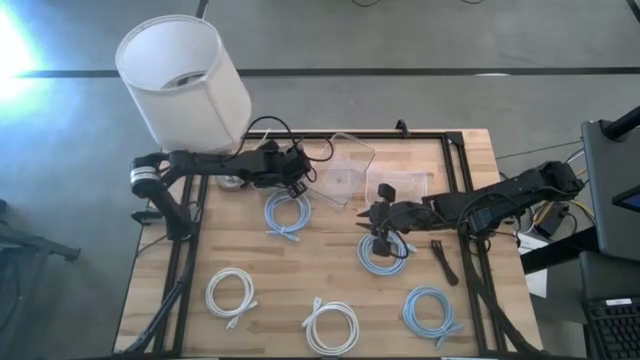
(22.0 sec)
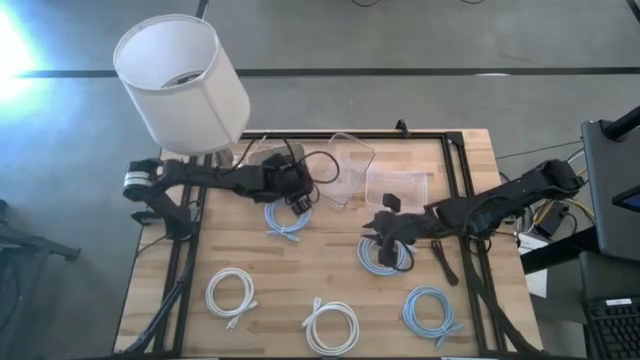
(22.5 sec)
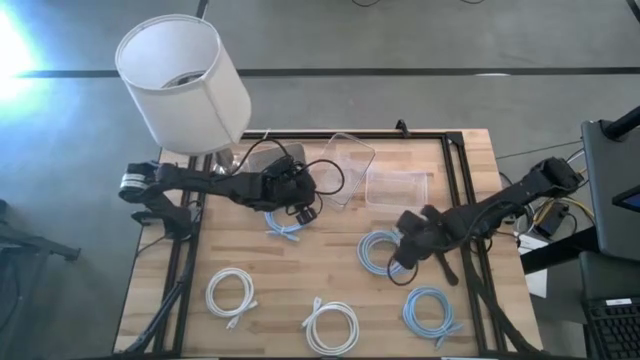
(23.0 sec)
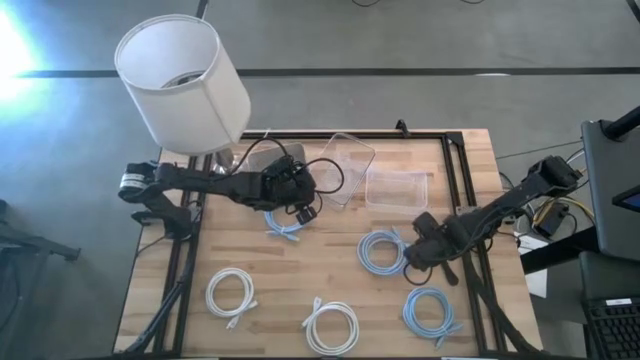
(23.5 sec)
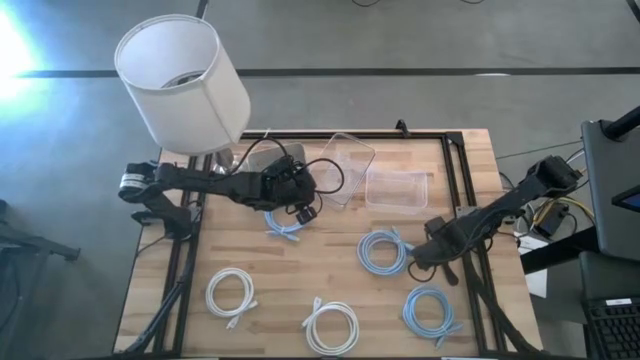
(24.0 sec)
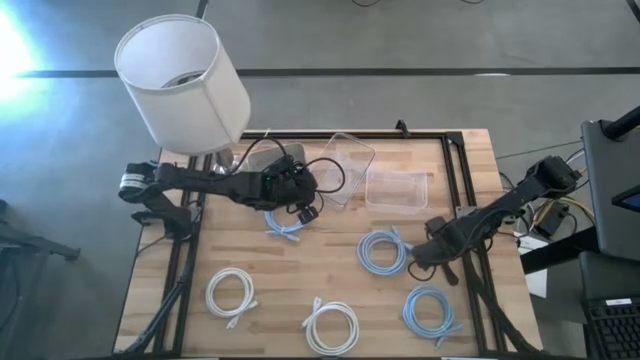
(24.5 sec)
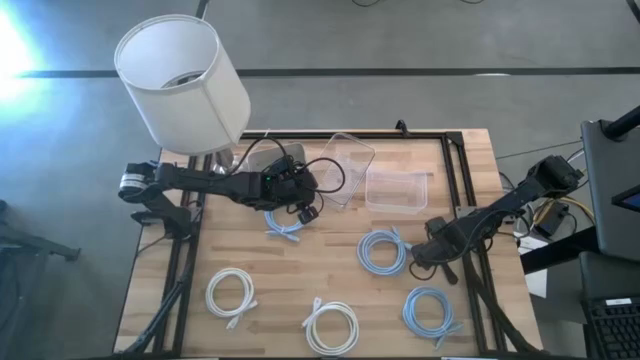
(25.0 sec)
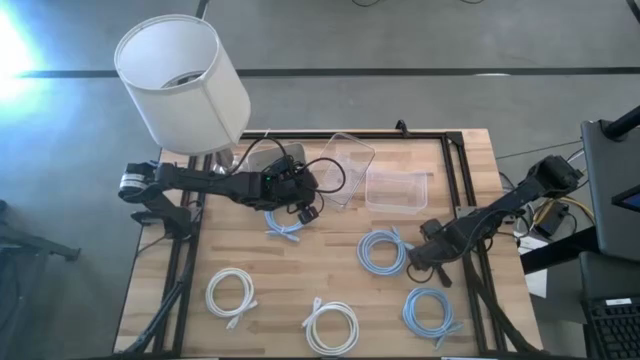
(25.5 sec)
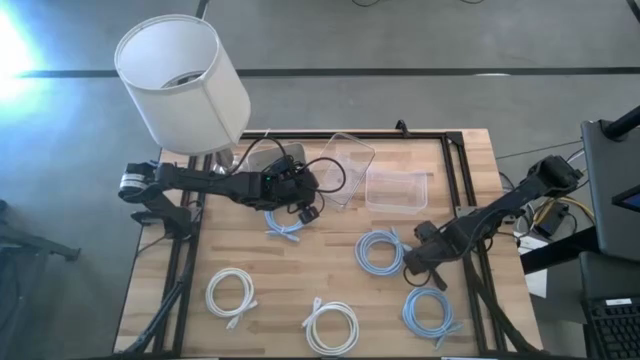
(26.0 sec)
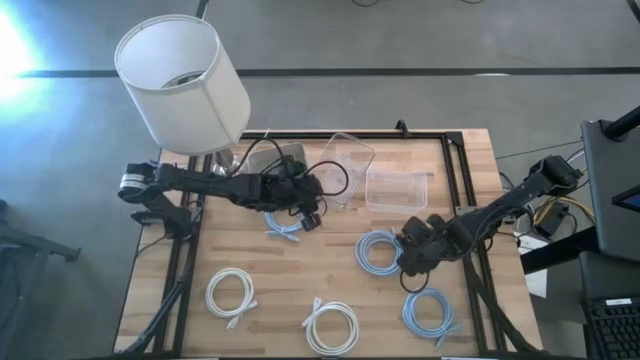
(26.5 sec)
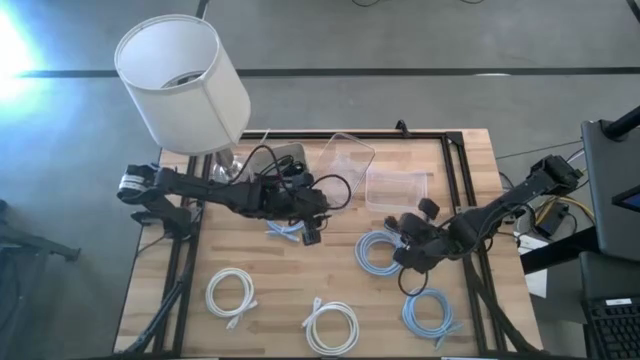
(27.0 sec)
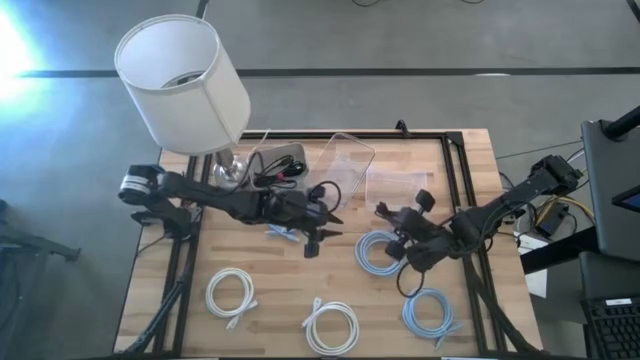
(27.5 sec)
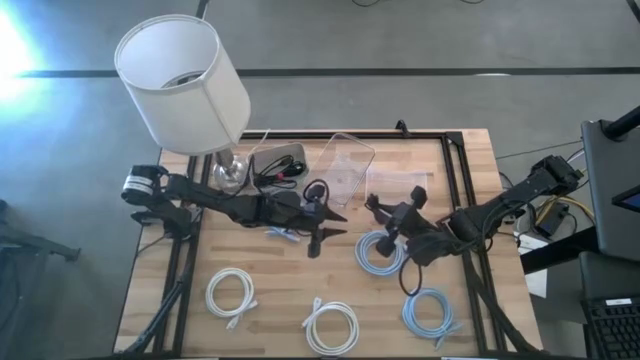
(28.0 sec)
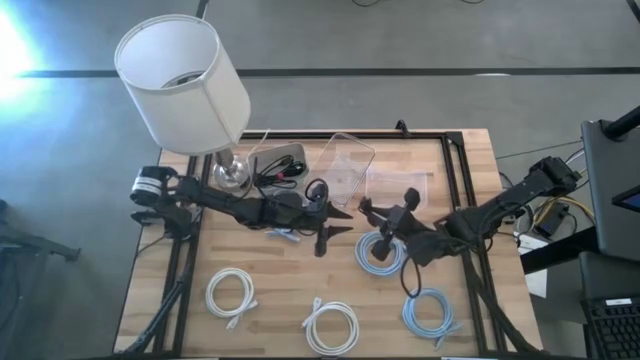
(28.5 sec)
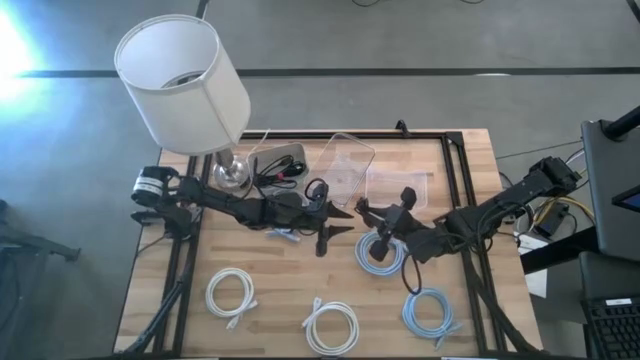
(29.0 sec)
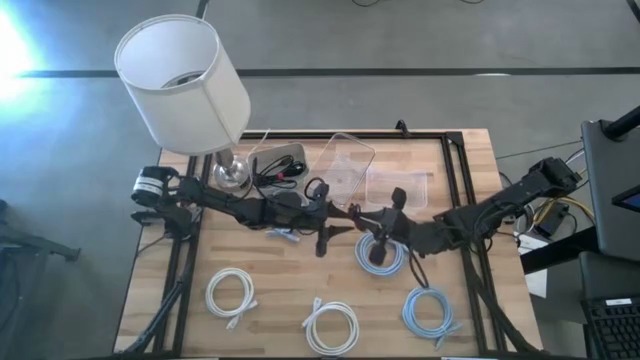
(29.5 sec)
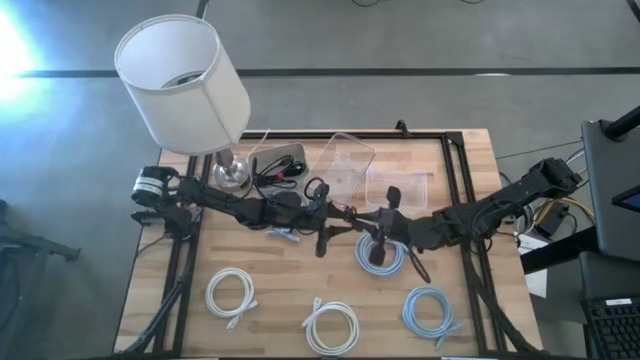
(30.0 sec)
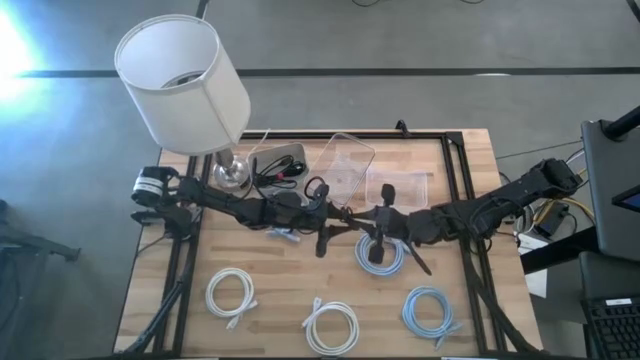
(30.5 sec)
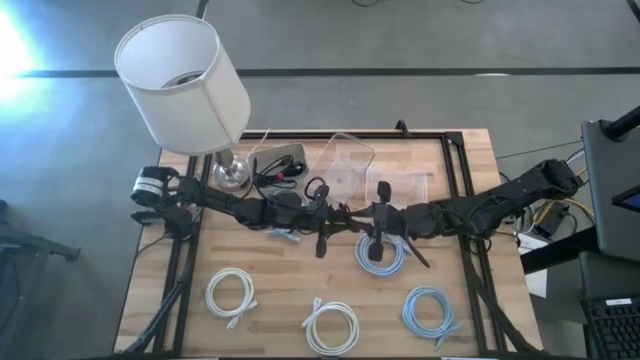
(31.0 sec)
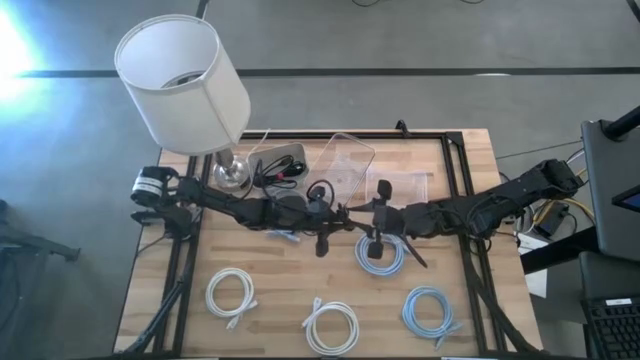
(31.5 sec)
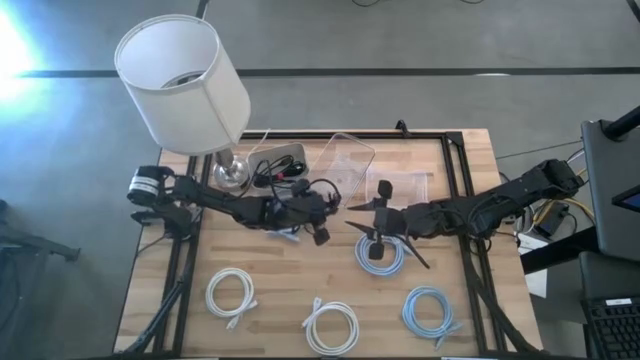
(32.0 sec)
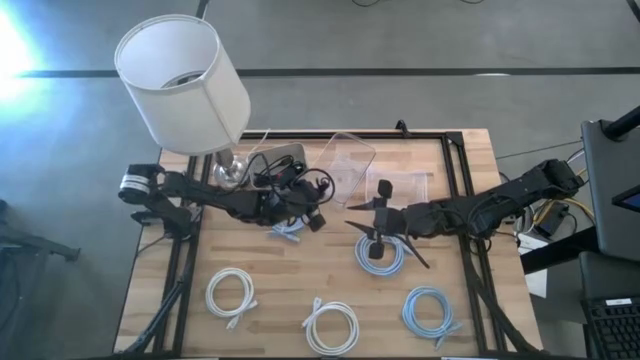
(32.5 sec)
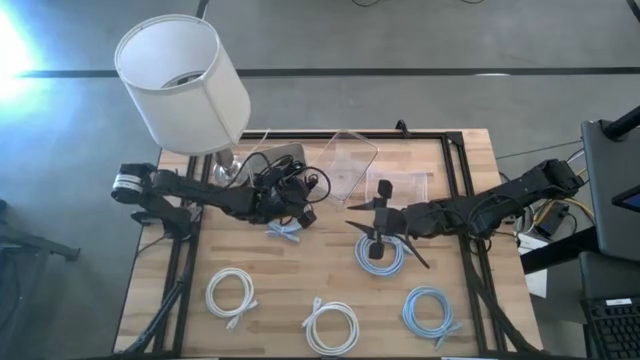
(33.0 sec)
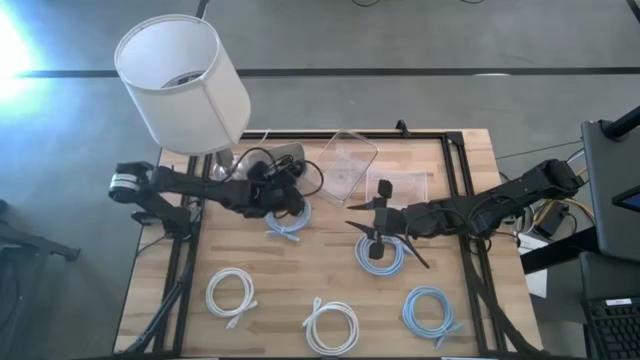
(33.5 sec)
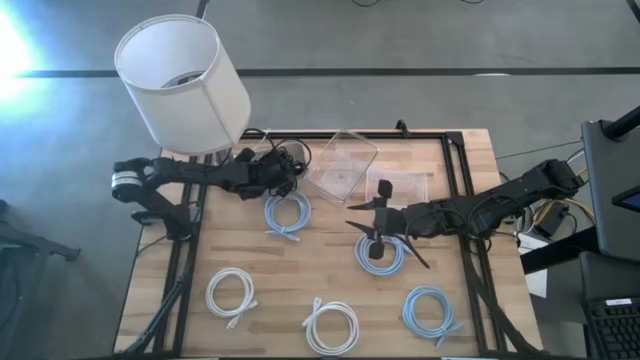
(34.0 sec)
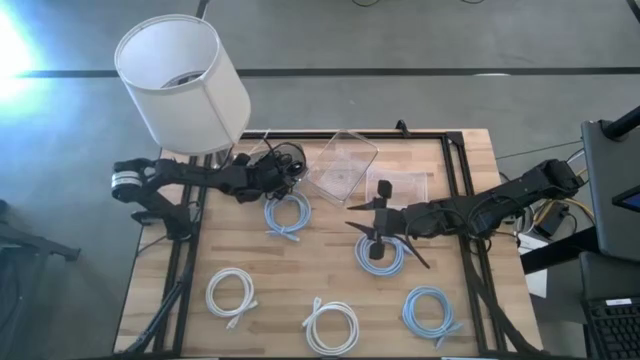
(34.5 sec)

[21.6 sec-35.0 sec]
Task: Pick & Place USB Port
Put the black USB cable into the white bin

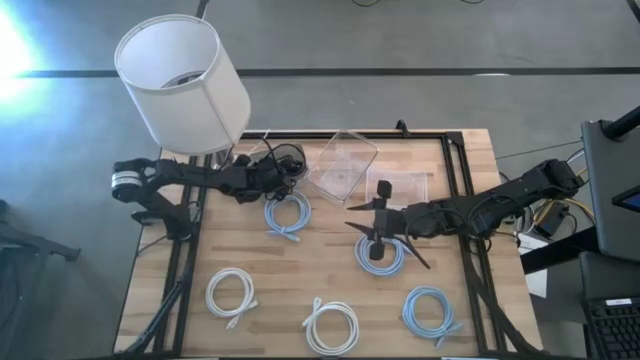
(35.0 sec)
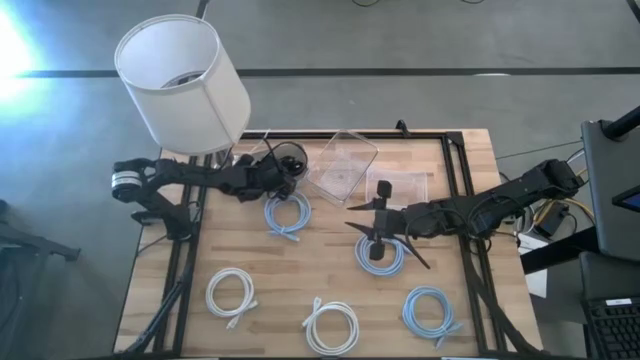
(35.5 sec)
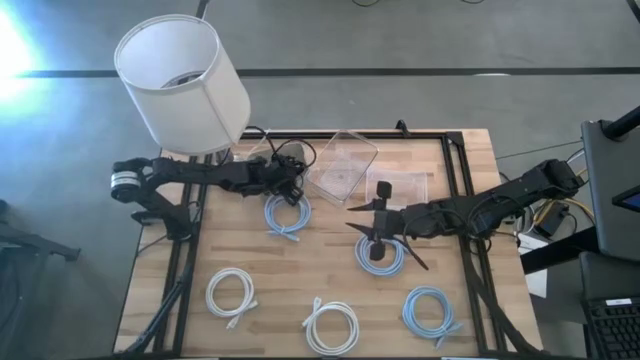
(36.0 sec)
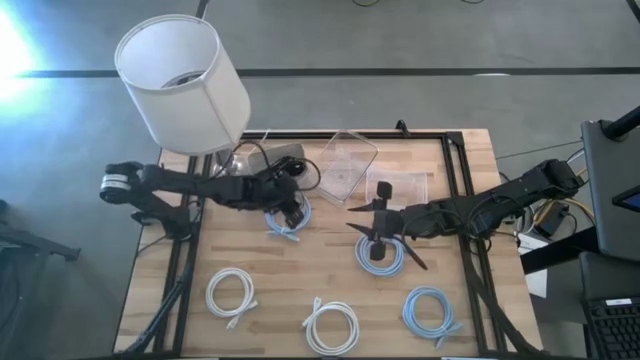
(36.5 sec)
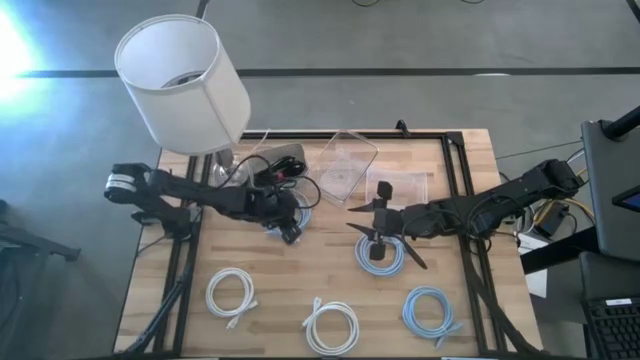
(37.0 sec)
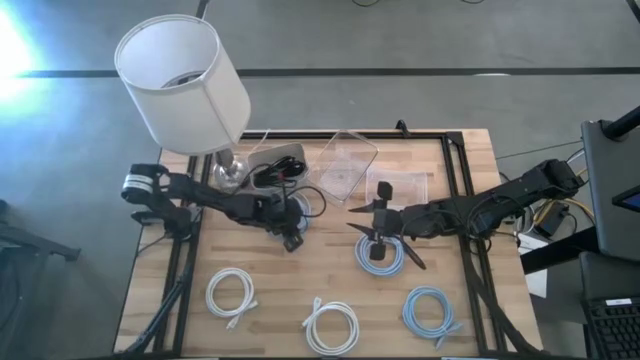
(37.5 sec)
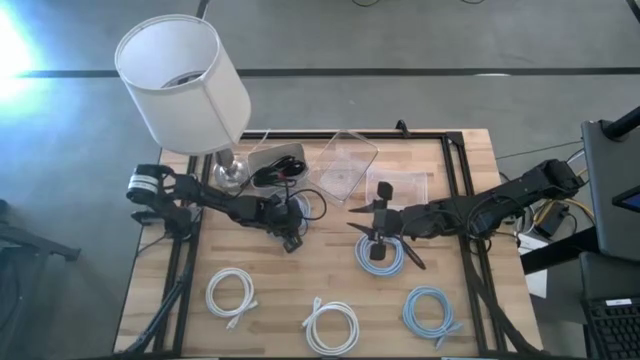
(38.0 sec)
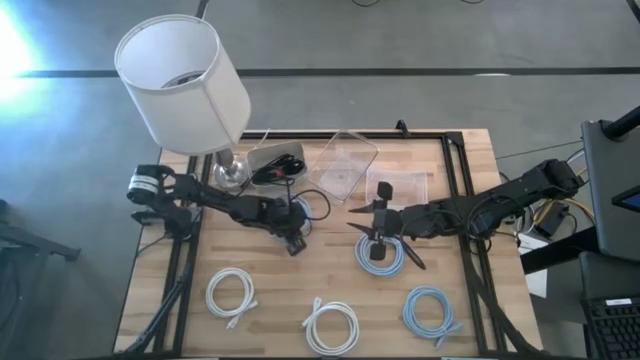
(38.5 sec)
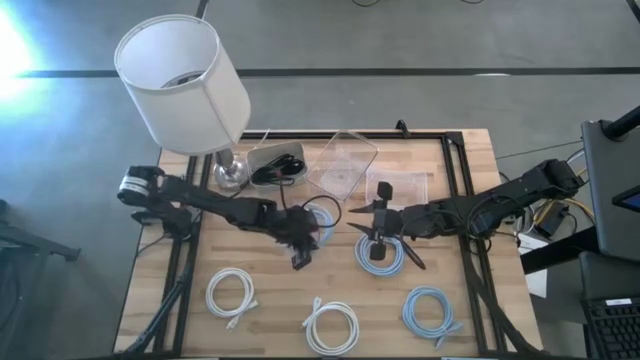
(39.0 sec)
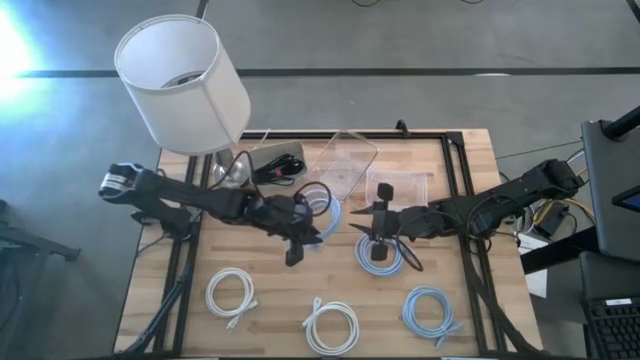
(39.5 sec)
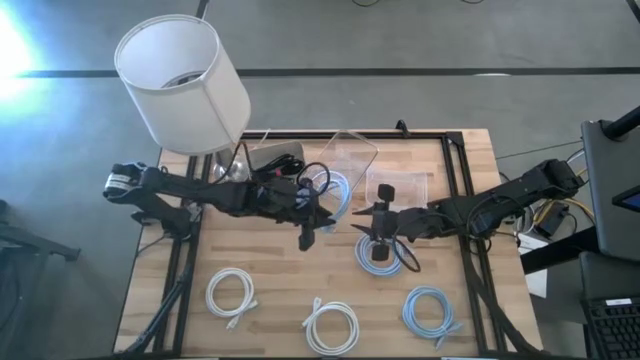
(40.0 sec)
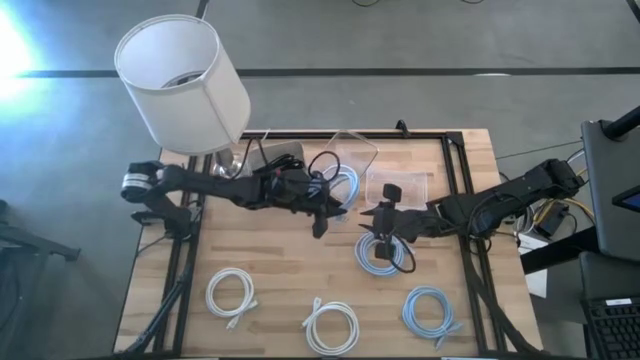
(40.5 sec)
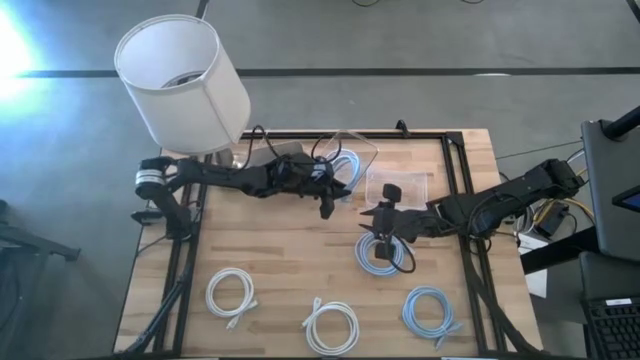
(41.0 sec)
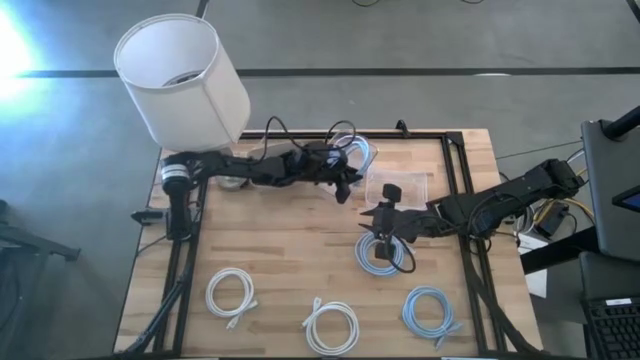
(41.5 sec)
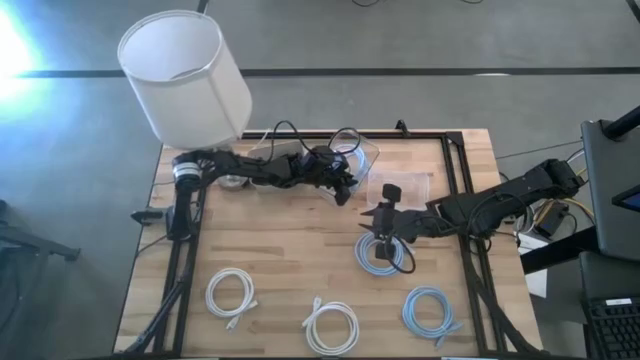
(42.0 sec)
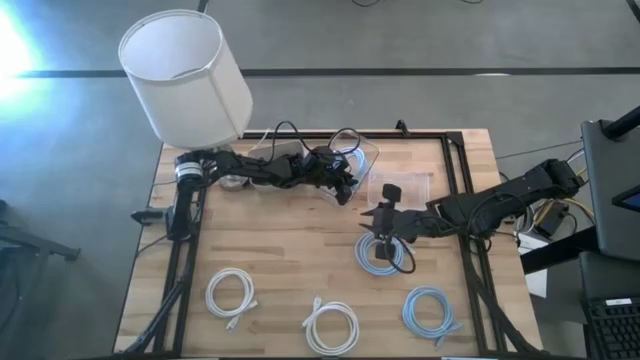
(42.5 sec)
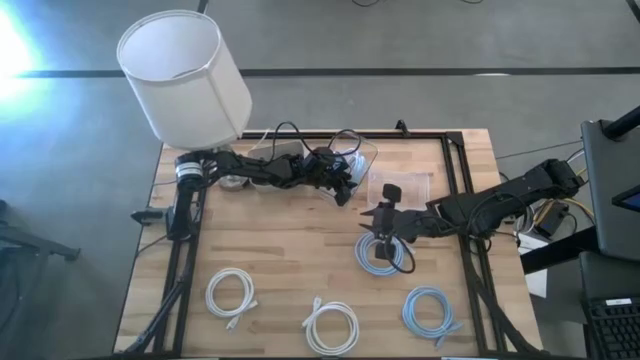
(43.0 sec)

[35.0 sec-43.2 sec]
Put the top left blue USB cable into the left transparent bin
